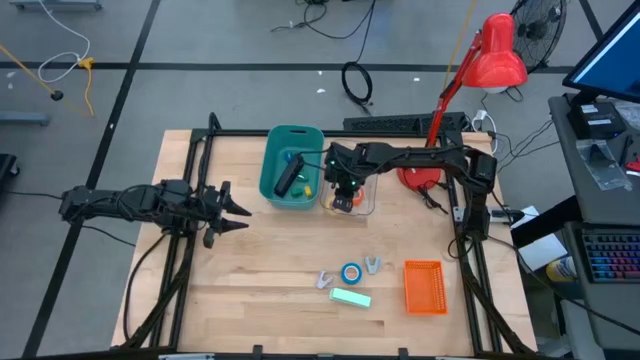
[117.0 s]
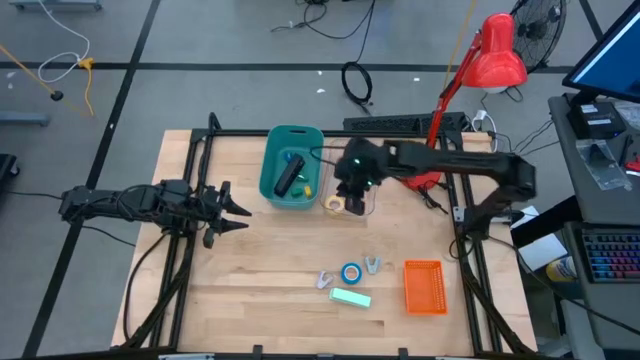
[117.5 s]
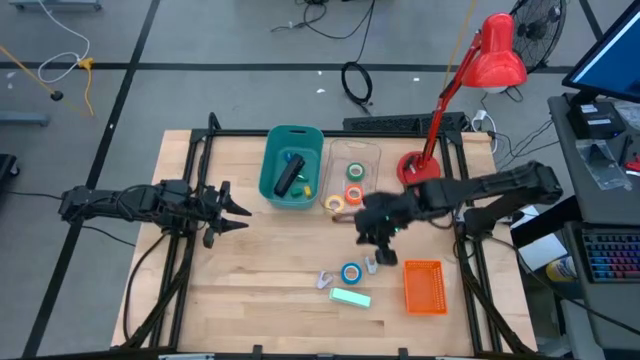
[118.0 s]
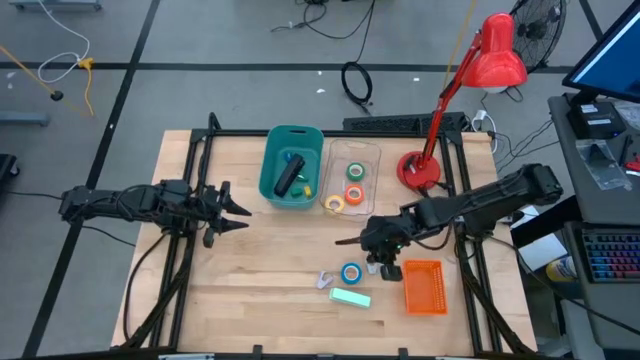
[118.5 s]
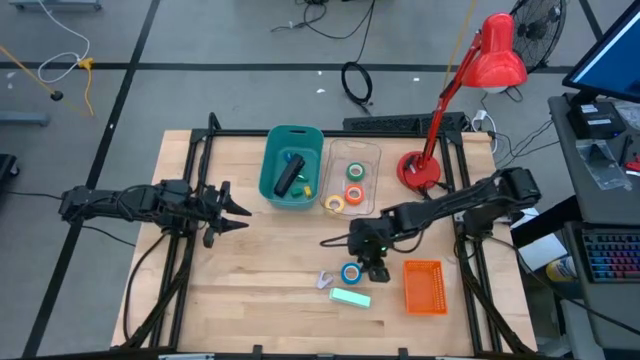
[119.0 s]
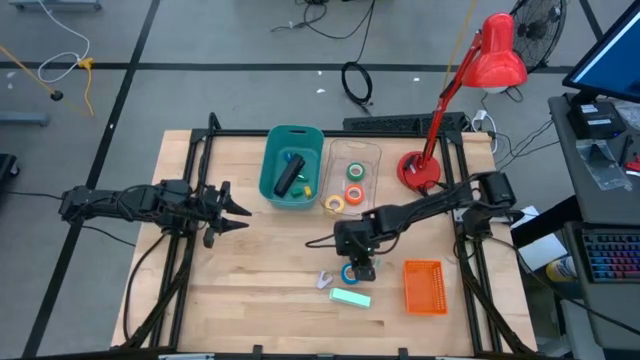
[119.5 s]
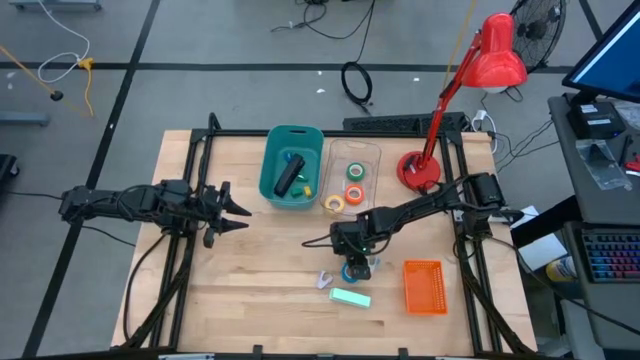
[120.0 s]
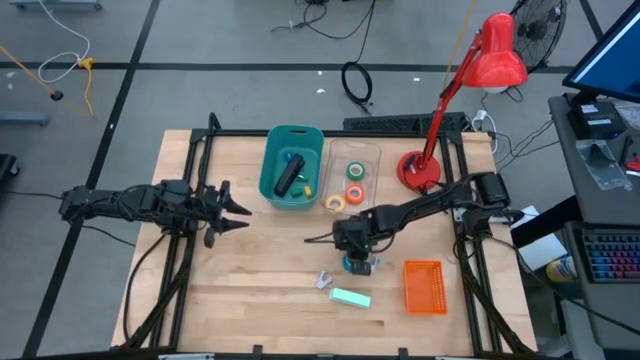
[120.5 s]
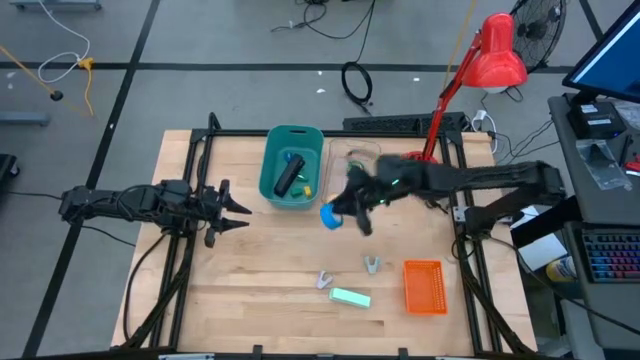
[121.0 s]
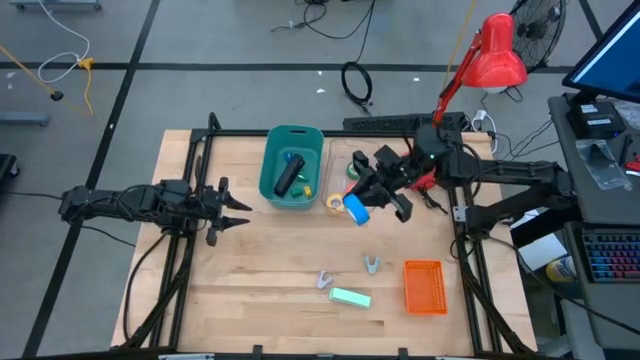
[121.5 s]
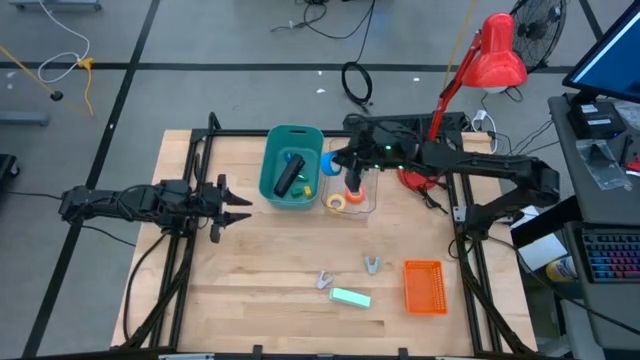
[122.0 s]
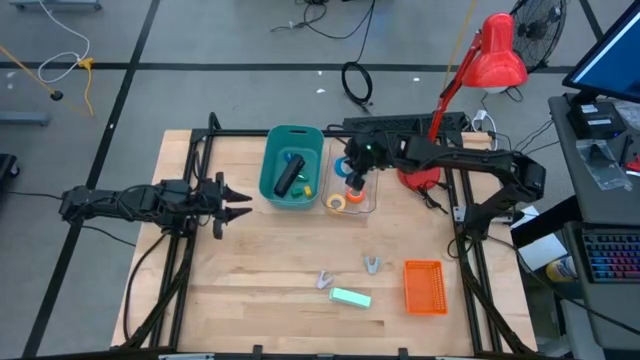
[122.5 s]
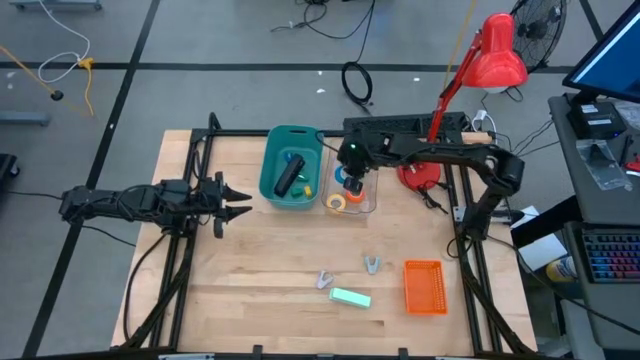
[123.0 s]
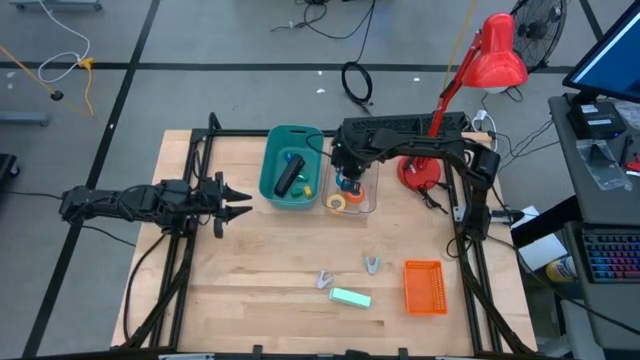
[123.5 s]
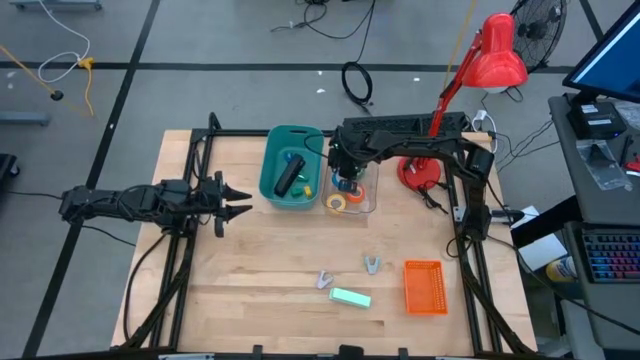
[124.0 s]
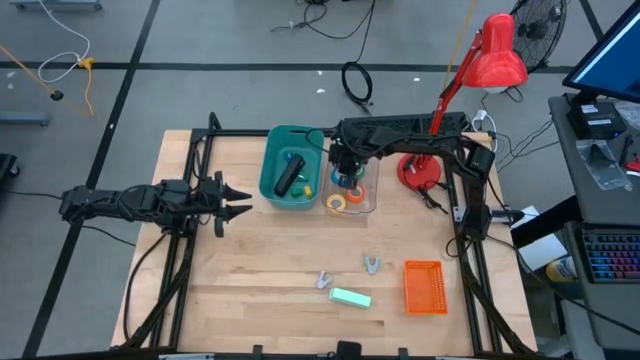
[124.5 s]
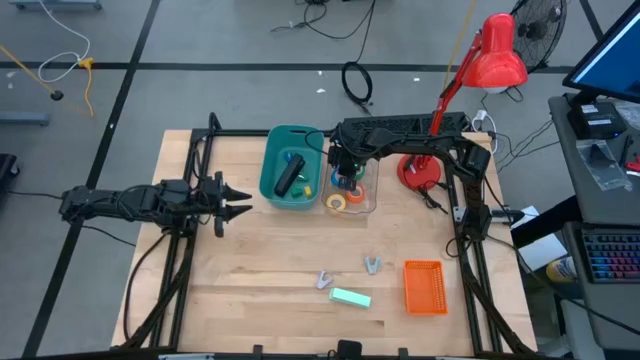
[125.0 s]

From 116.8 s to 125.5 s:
Task: Pick and place Stapler, Stapler remover, tape
Put the blue tape into the transparent bin

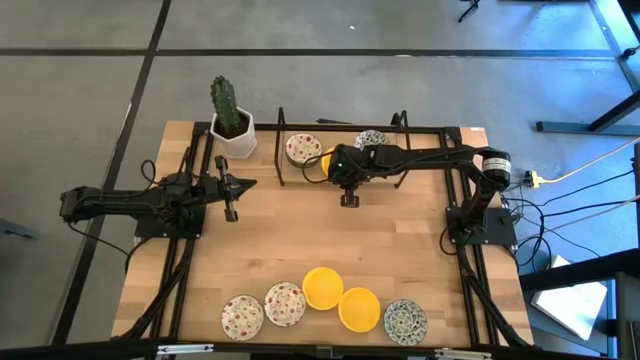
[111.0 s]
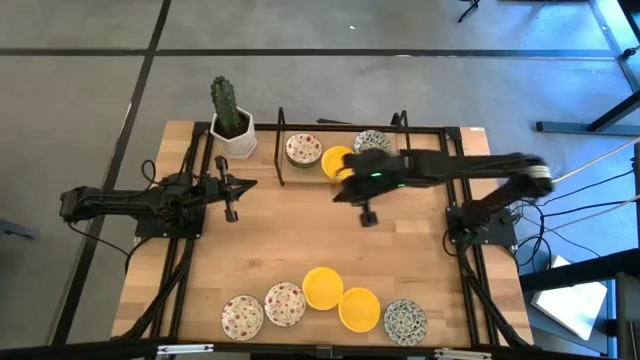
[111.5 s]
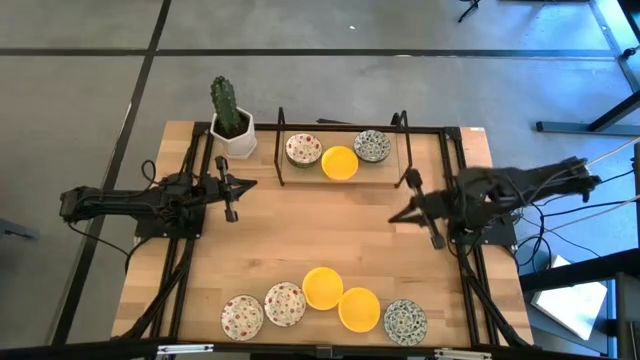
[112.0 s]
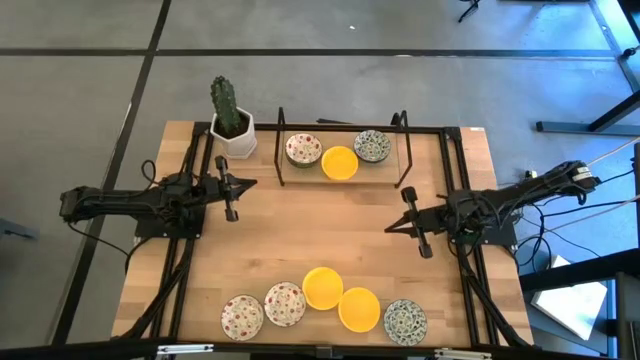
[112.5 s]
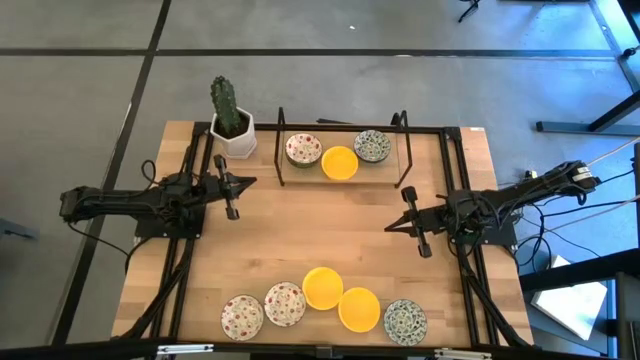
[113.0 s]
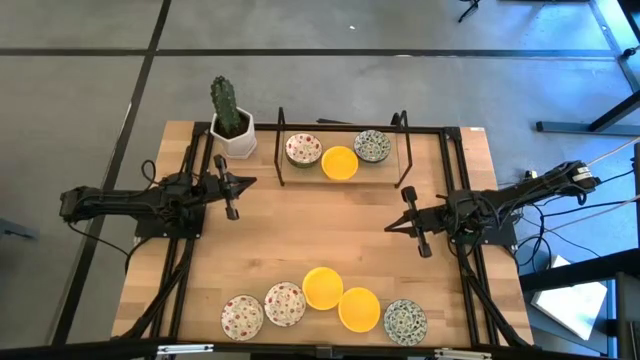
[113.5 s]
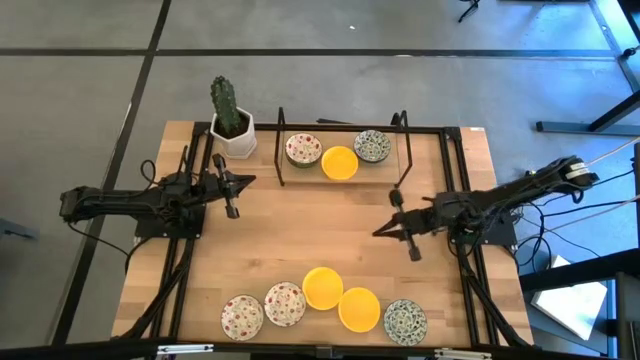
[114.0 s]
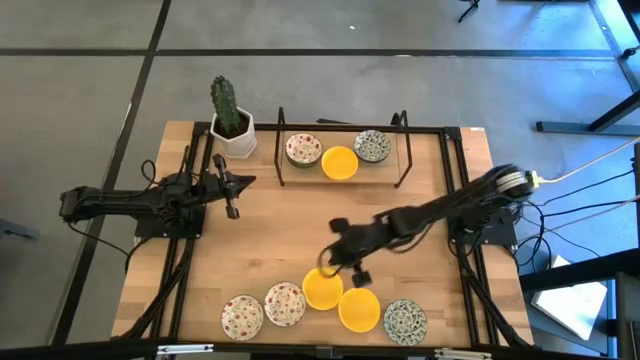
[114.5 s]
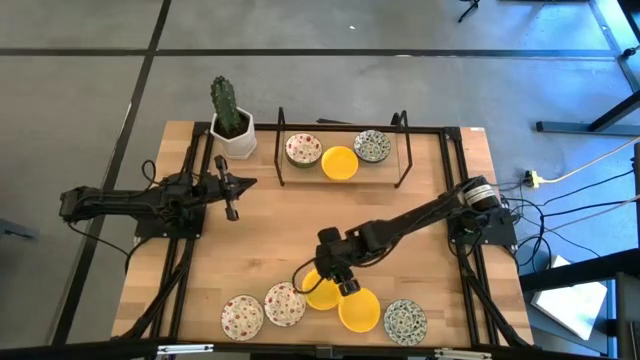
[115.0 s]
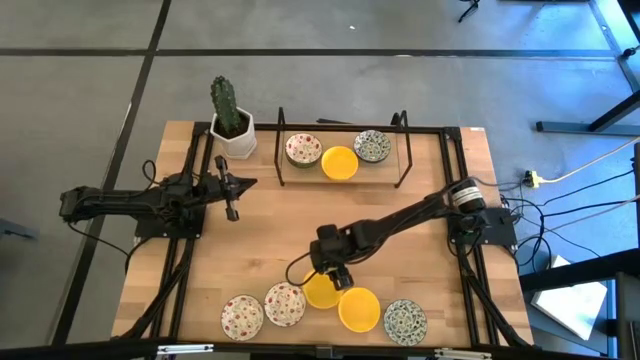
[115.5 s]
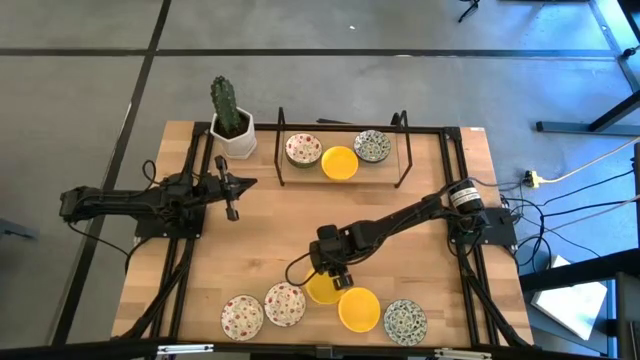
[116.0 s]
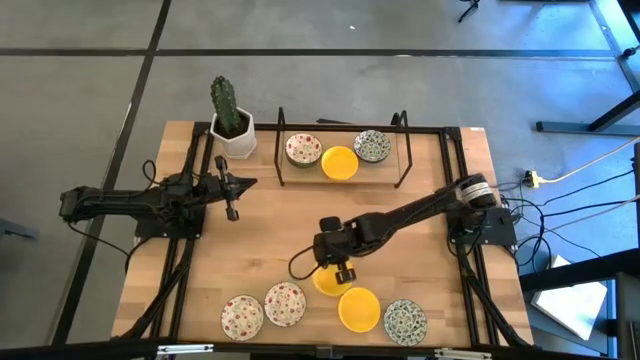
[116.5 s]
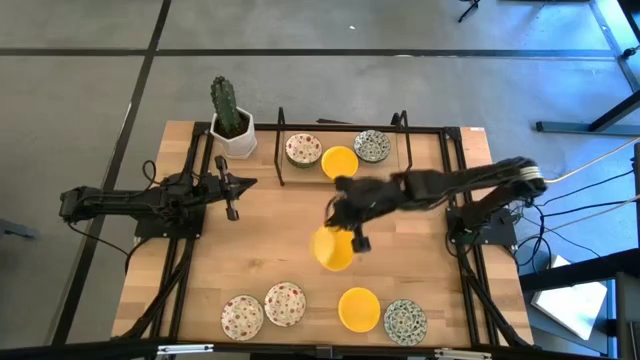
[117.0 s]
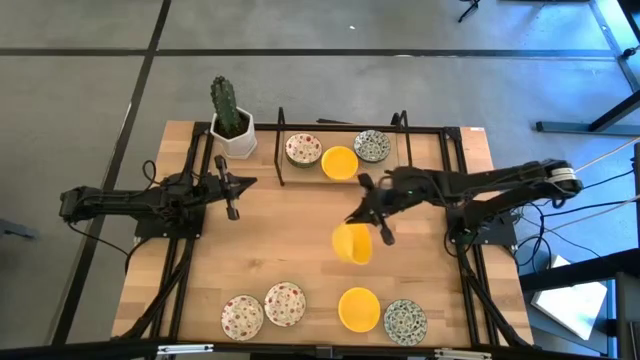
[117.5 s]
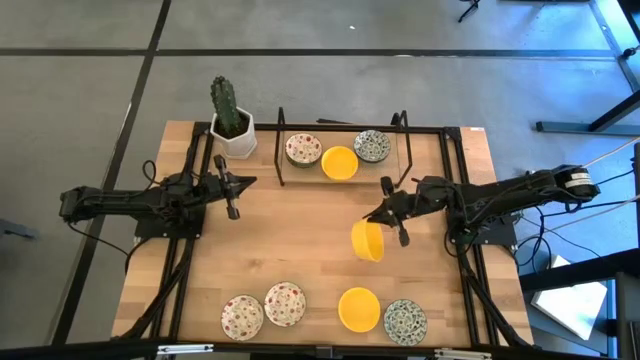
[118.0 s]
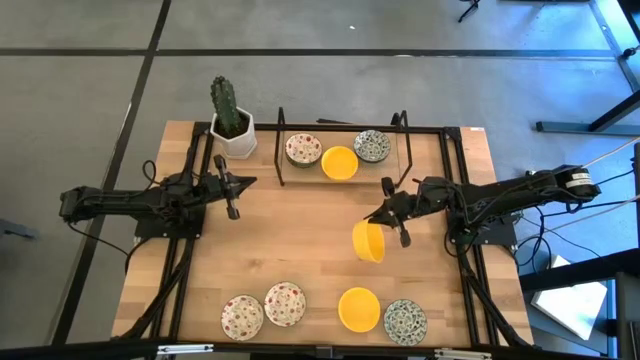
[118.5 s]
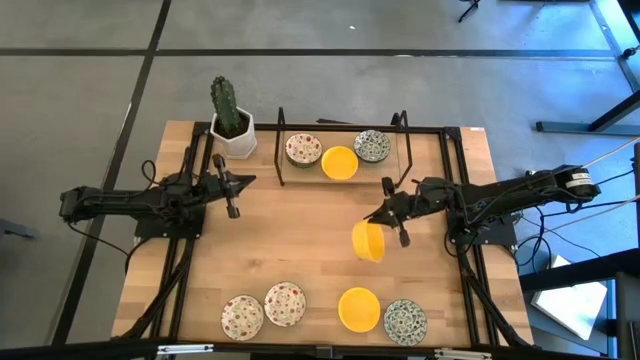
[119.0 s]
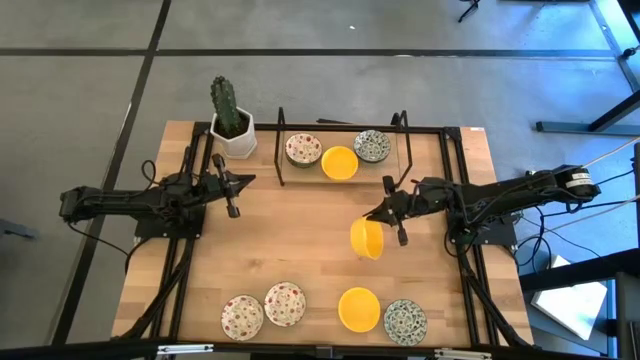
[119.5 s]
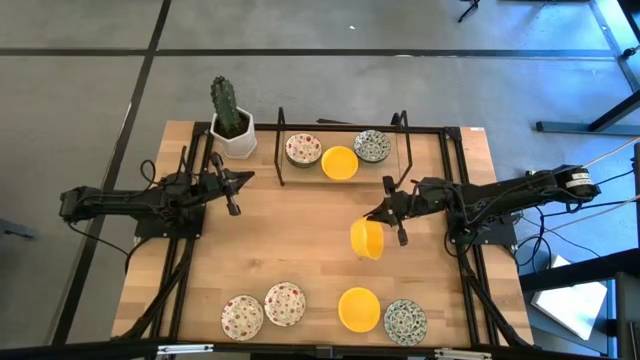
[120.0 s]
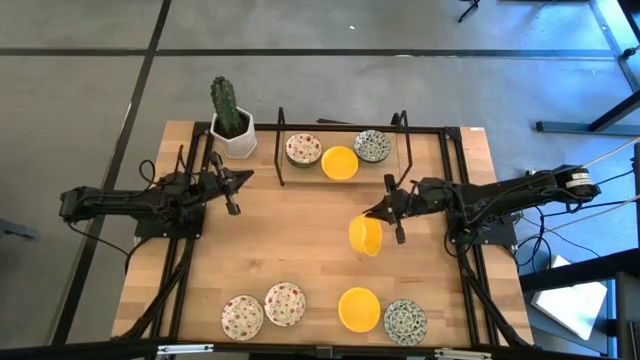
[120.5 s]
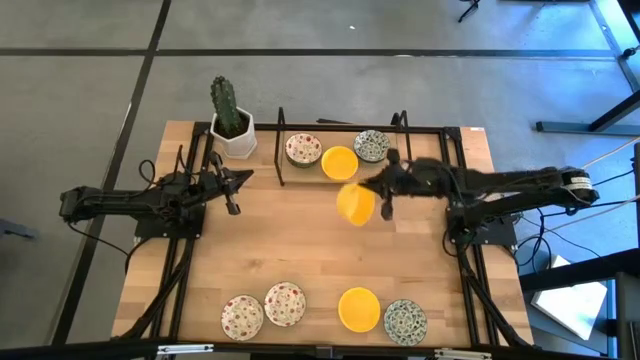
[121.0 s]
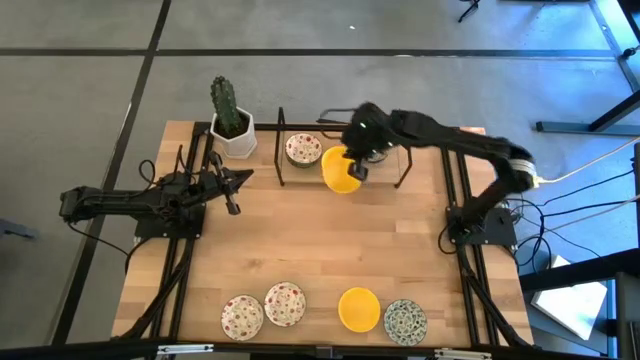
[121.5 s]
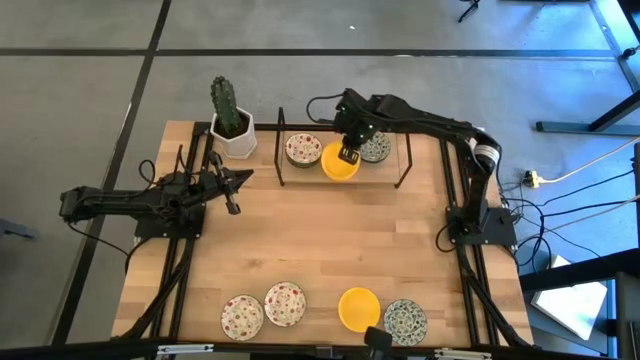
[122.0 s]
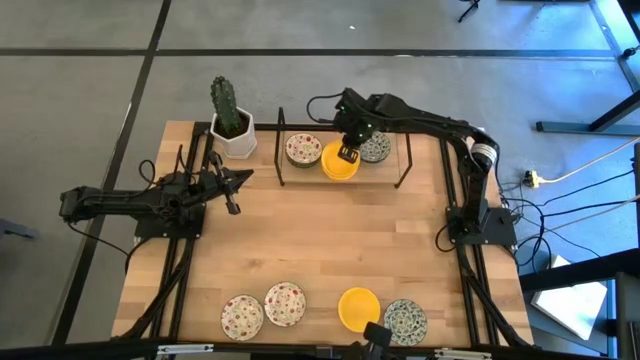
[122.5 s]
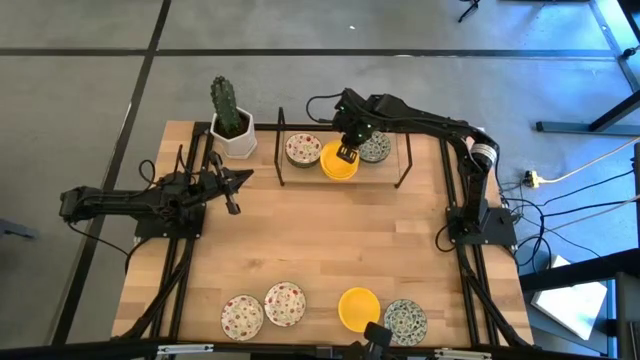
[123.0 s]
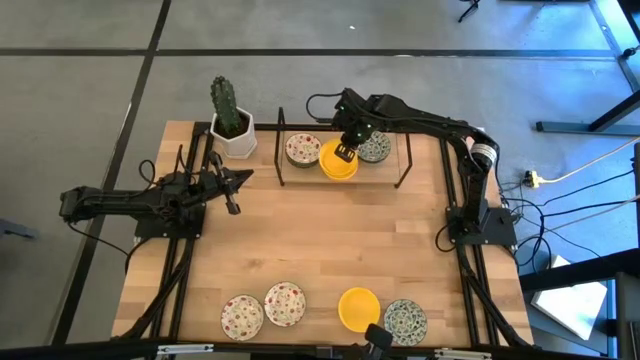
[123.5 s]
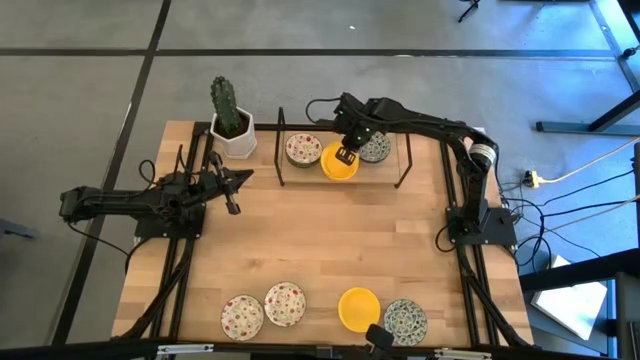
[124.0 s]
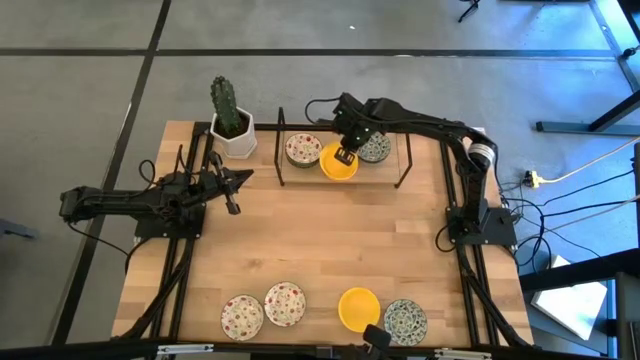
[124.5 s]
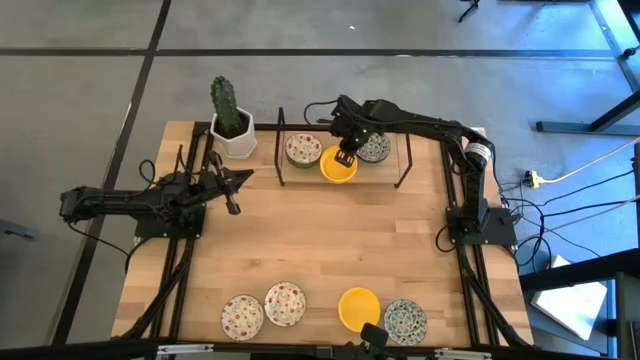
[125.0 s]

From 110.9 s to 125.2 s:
Task: Pick & Place Mini bowls
Stack the yellow bowl on the top of the yellow bowl on the shelf
